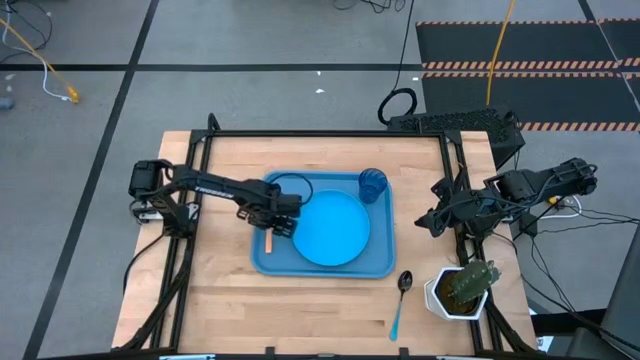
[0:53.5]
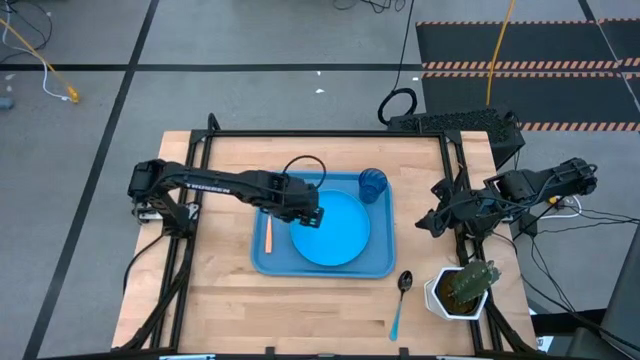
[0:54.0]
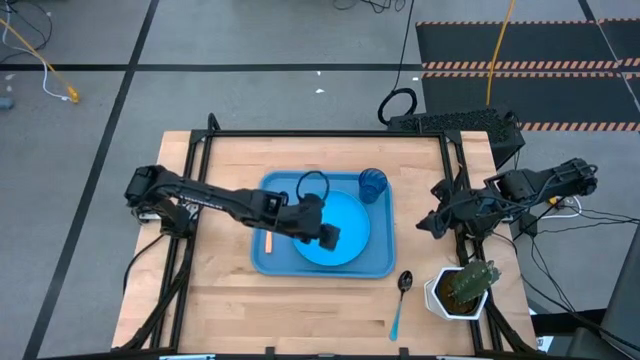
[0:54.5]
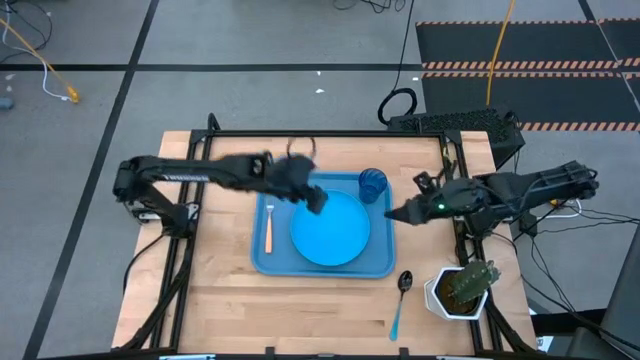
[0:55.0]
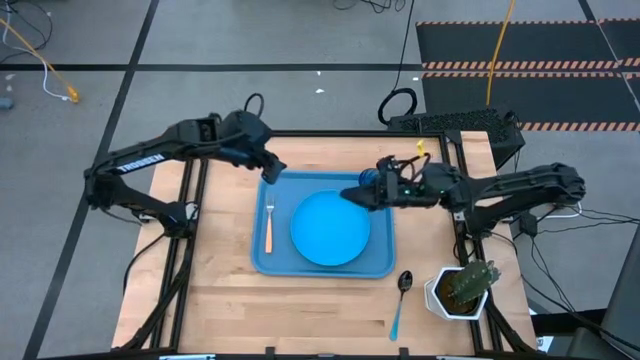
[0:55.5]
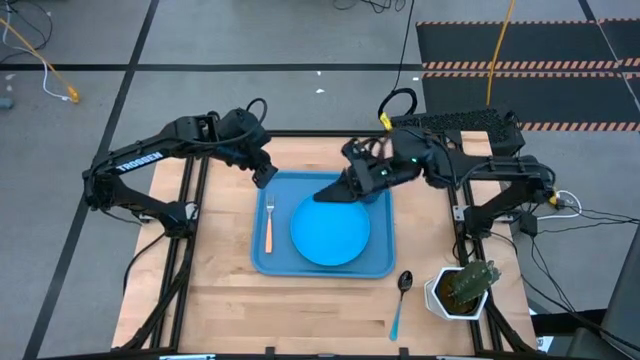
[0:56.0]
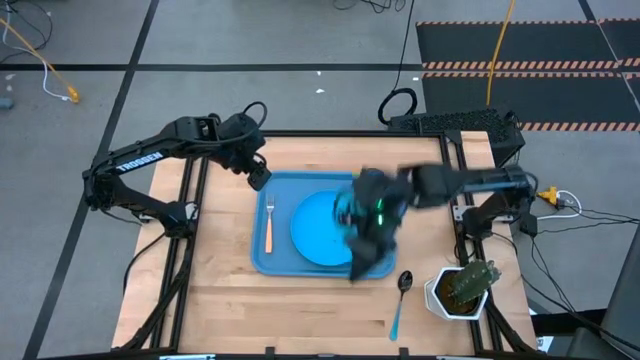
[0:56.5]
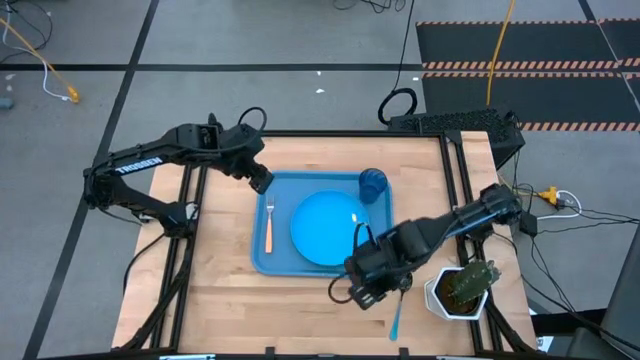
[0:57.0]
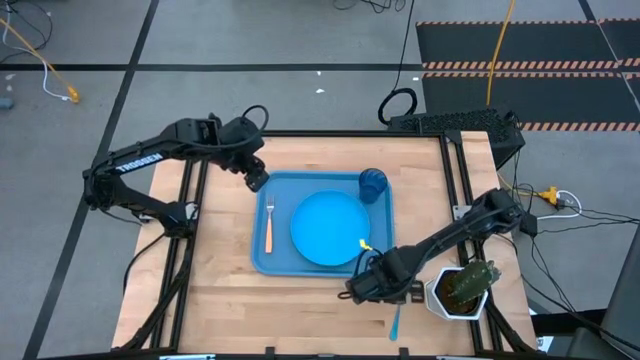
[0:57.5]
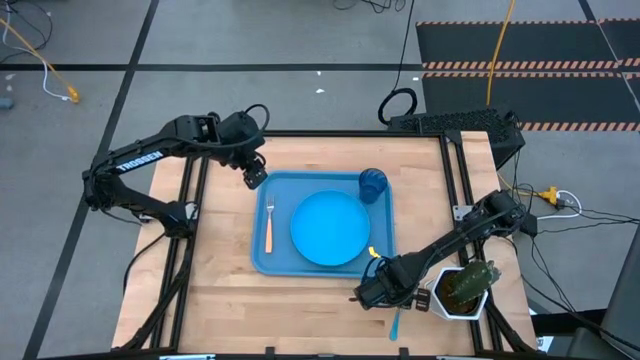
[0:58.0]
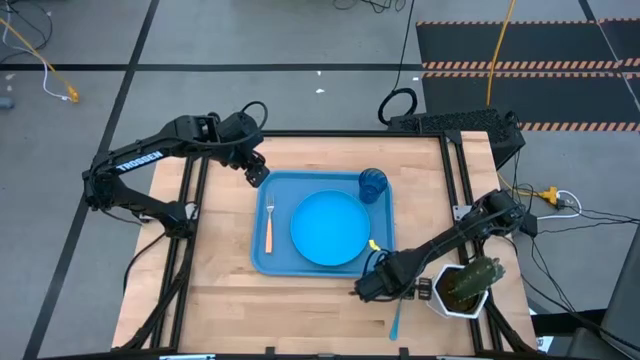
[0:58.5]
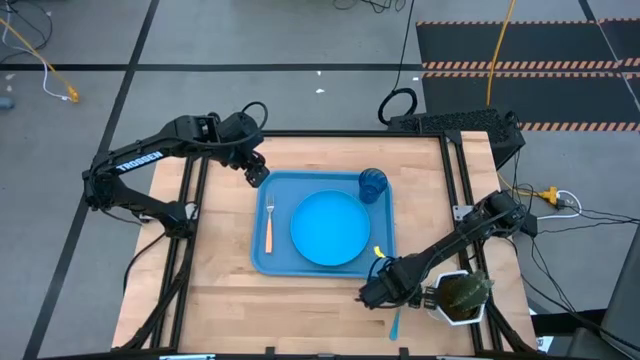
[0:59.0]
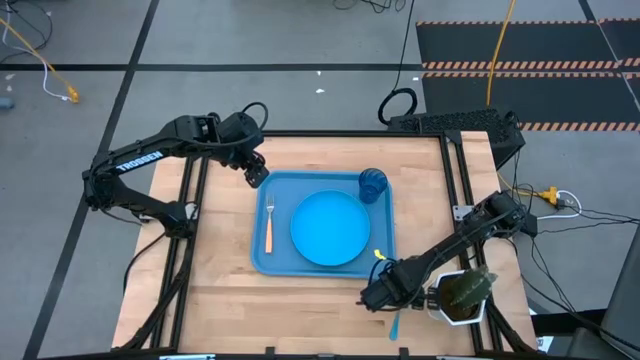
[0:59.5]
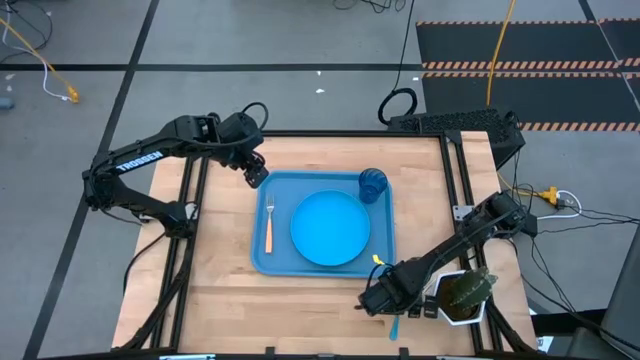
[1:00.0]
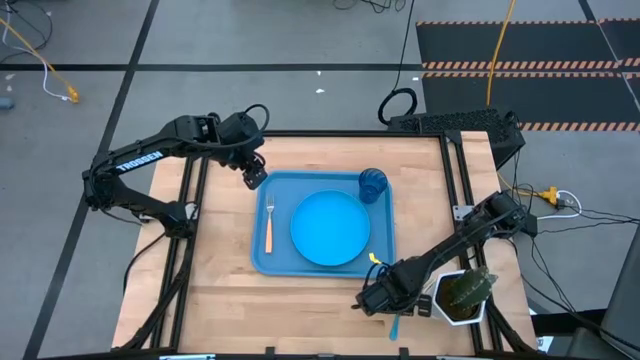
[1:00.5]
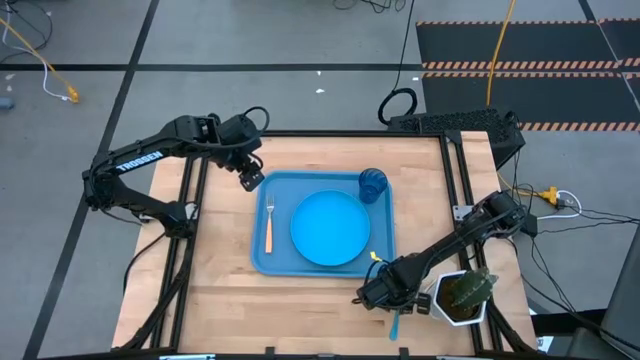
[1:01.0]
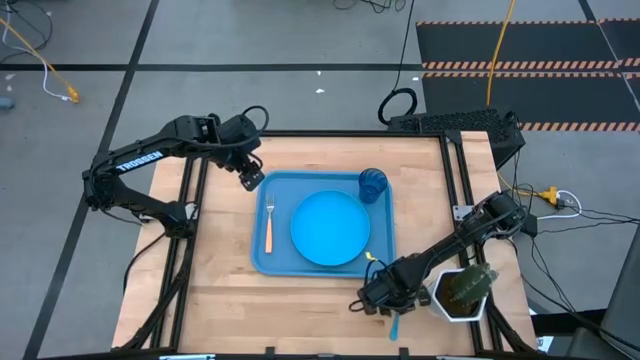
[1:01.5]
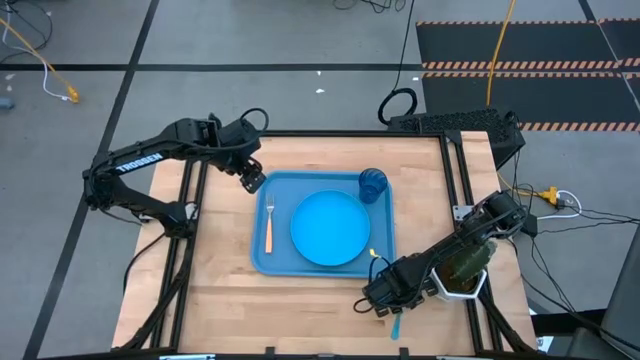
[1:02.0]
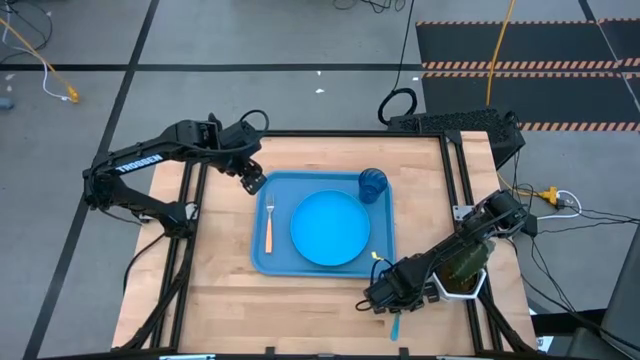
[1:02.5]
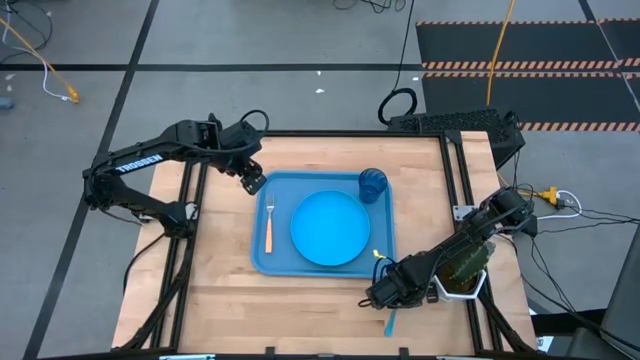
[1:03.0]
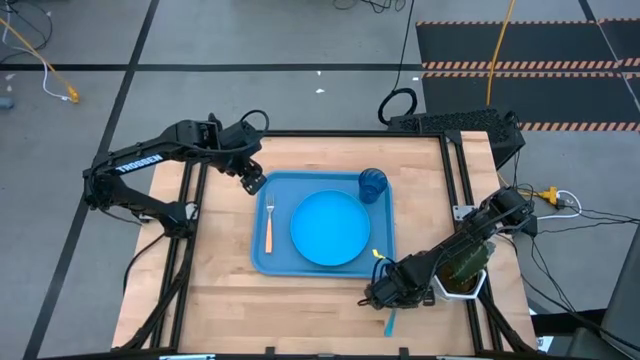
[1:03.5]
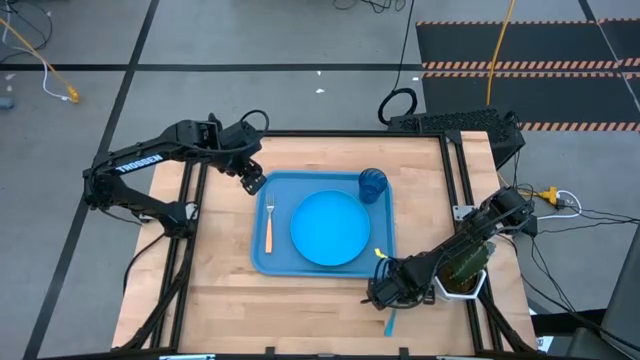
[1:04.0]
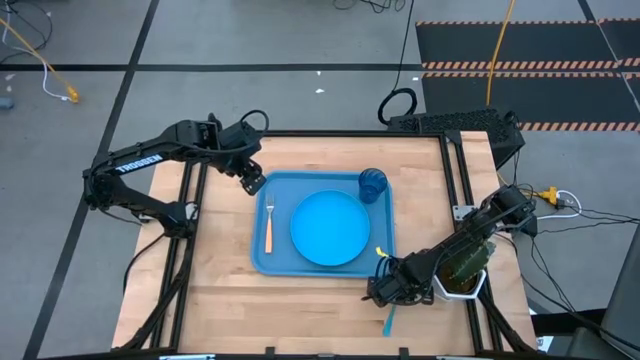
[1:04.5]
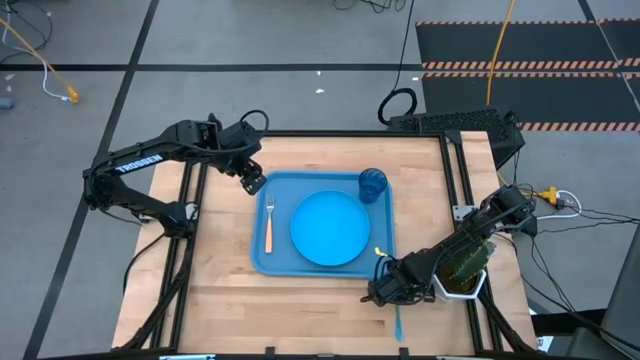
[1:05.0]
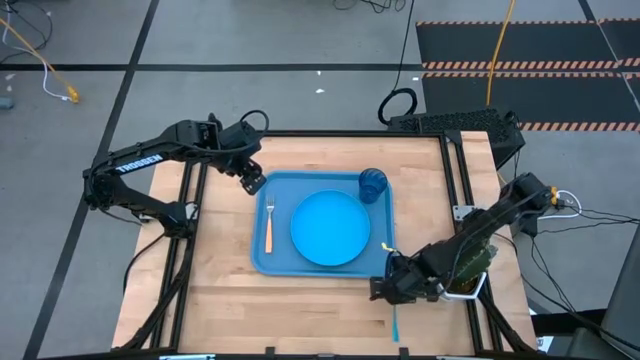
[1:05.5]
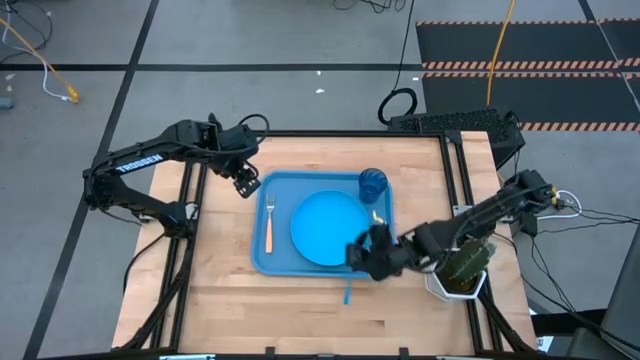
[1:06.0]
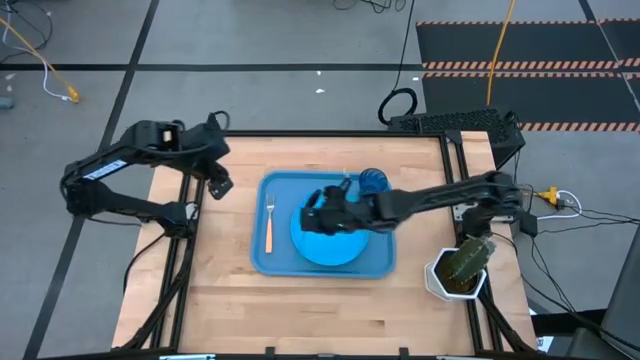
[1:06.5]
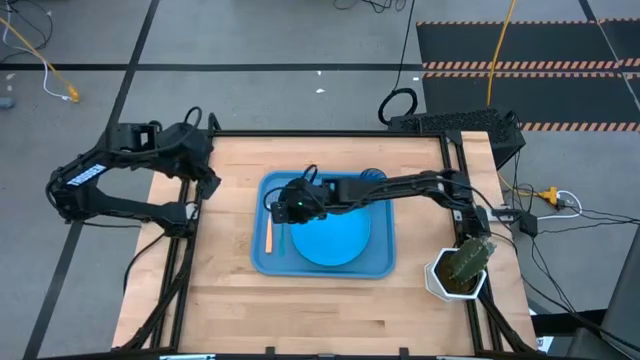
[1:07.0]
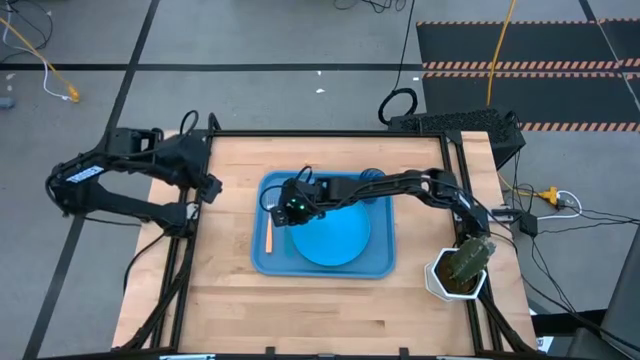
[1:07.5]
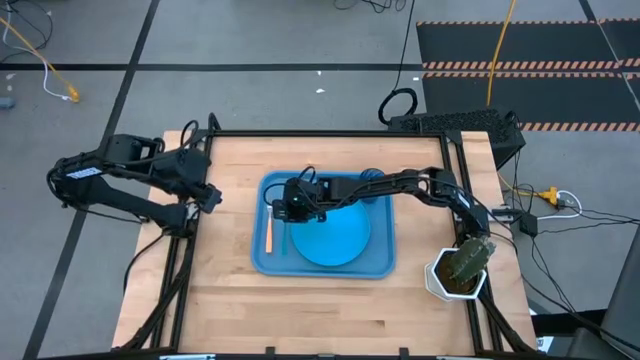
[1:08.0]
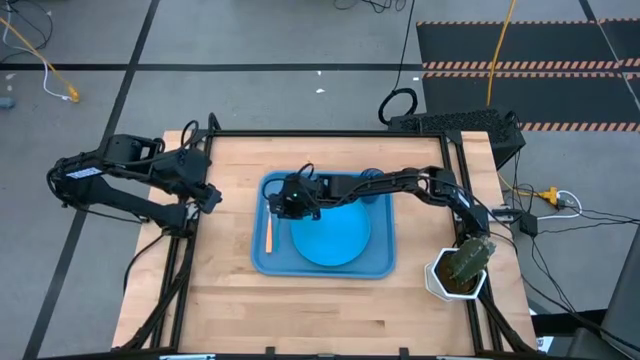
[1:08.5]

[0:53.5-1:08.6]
Task: Pick and place plate/cup/fork/spoon on tray
Put the blue spoon on the blue tray to the left of the blue plate

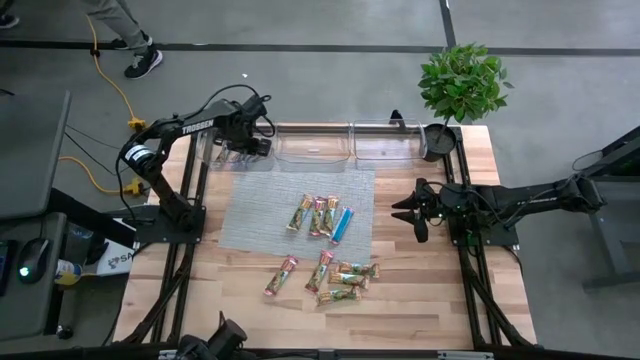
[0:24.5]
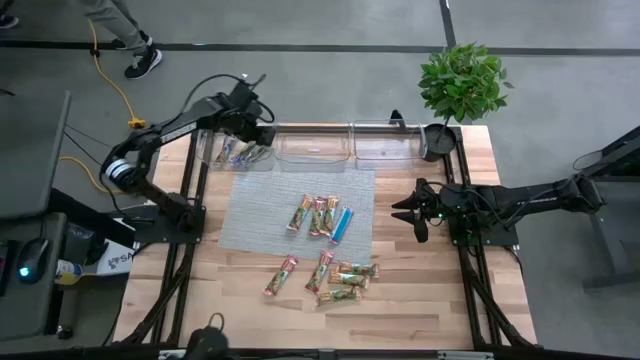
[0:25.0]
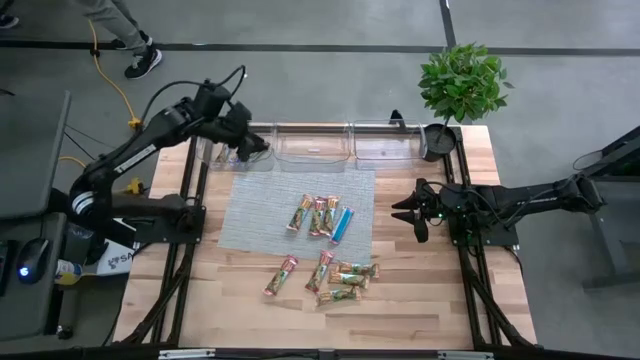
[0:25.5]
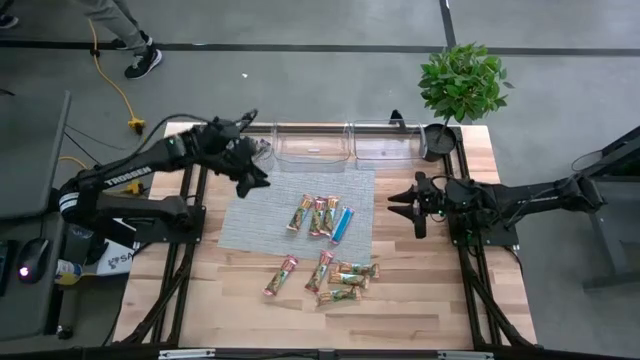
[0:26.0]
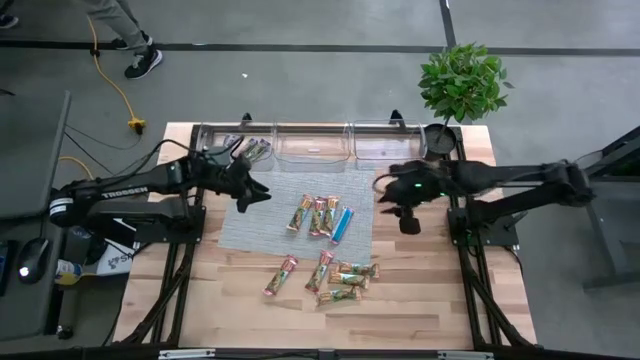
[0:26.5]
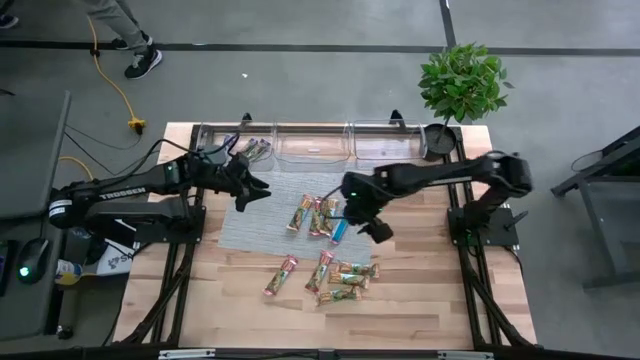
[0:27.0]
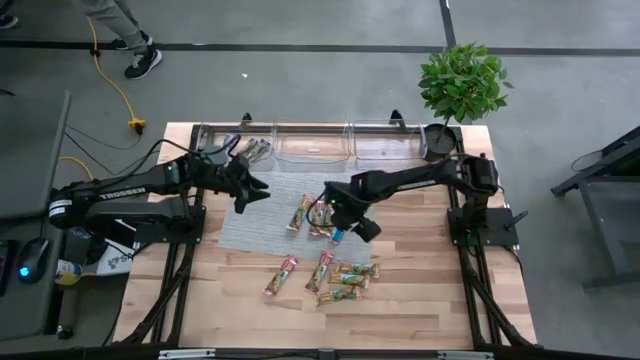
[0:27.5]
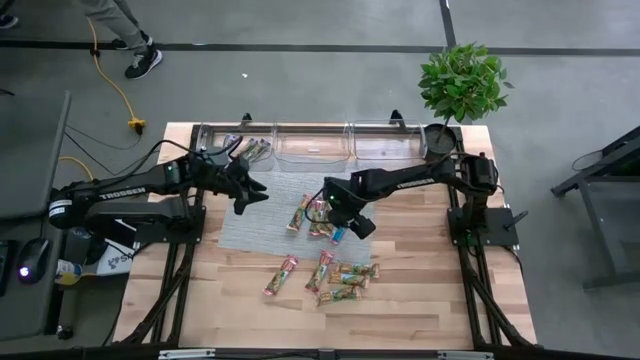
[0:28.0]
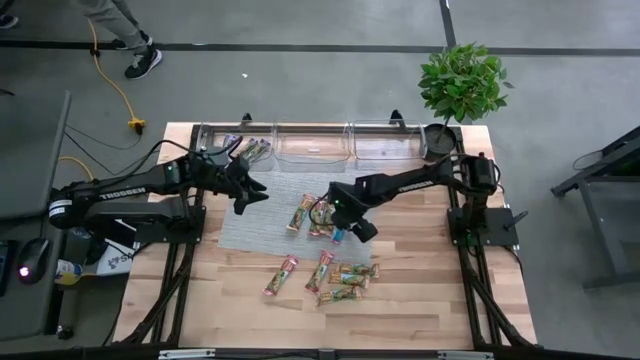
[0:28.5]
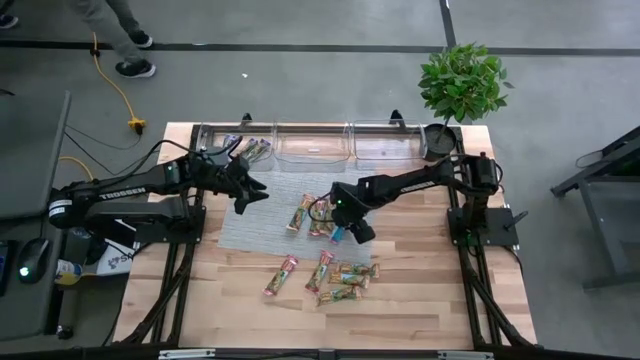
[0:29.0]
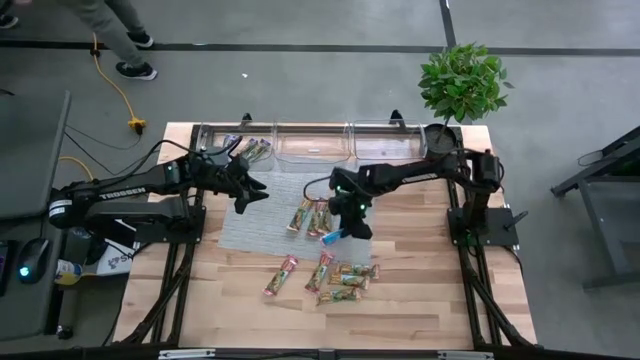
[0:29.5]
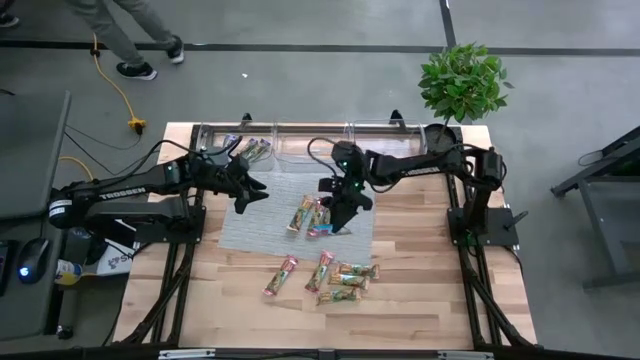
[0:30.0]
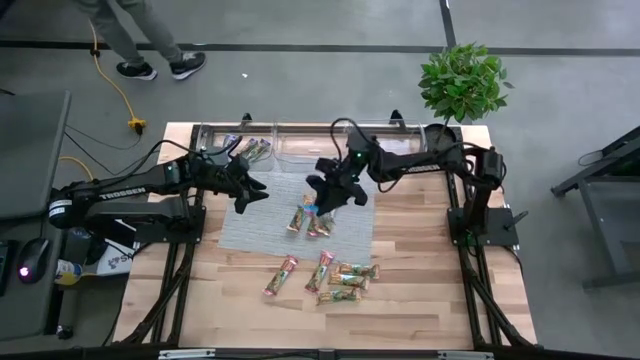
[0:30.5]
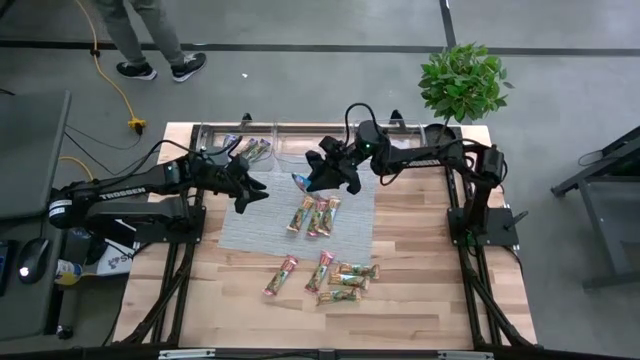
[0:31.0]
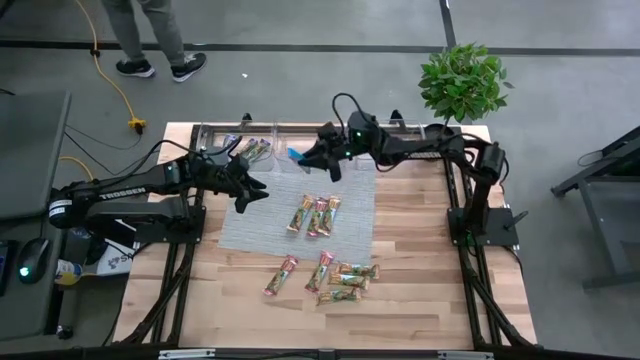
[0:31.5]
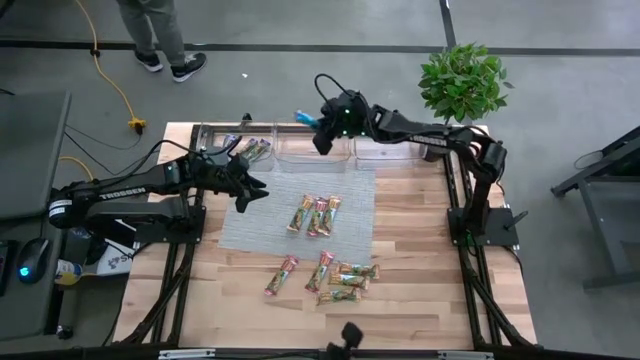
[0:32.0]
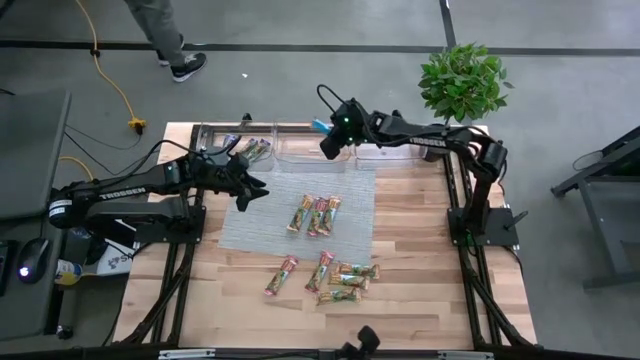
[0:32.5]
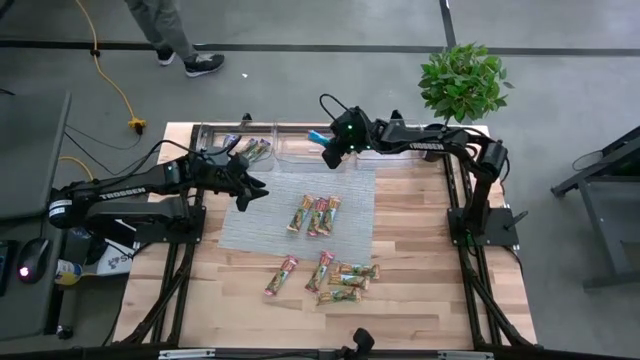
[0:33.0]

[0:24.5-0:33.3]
Task: Pick and place Granola Bars by type
Put the red granola bar into the middle transparent bin
